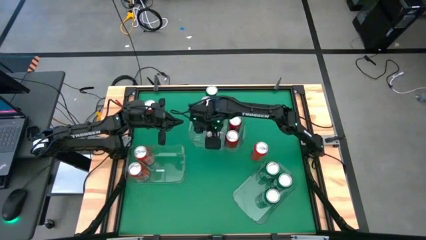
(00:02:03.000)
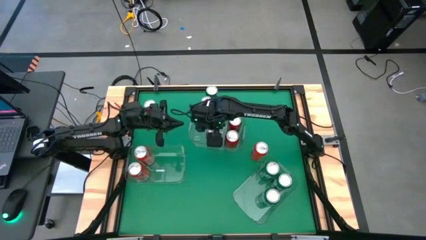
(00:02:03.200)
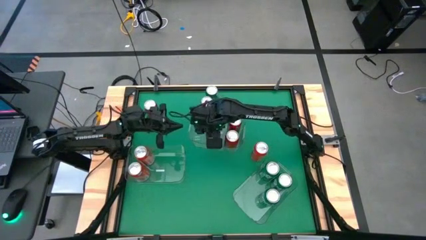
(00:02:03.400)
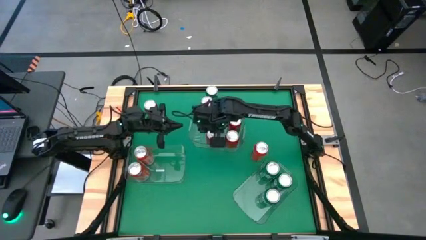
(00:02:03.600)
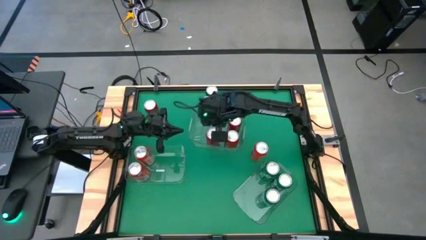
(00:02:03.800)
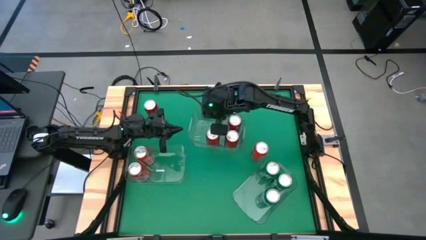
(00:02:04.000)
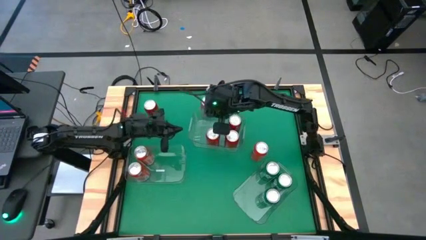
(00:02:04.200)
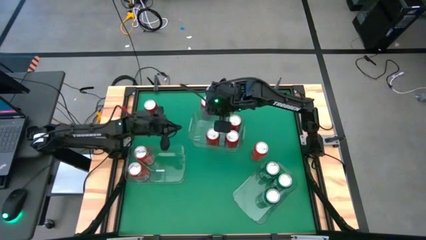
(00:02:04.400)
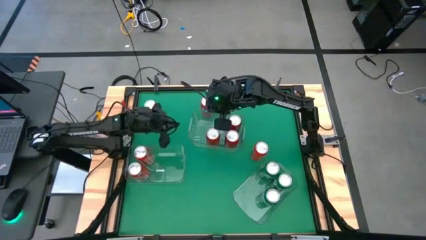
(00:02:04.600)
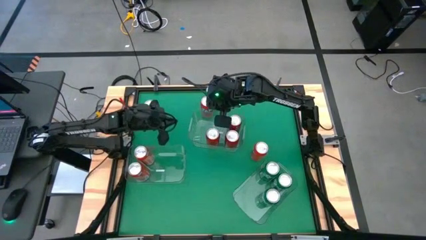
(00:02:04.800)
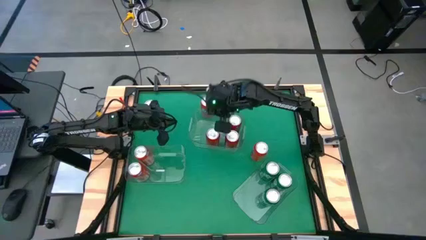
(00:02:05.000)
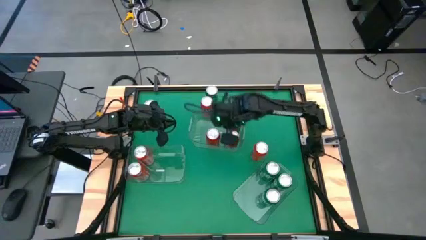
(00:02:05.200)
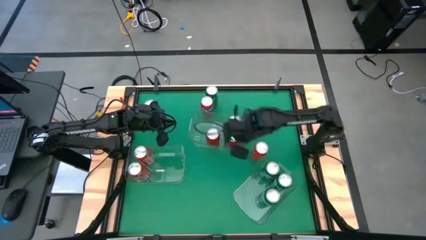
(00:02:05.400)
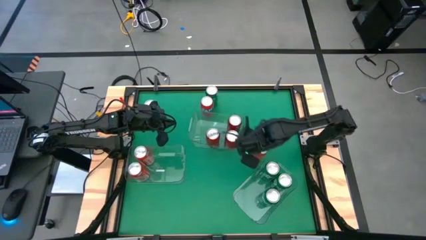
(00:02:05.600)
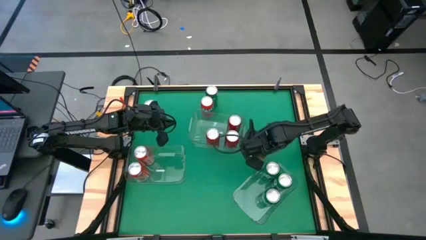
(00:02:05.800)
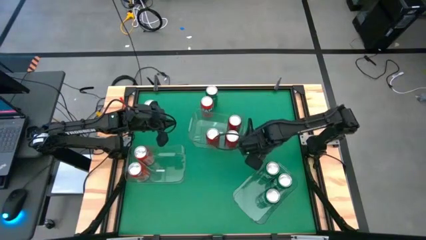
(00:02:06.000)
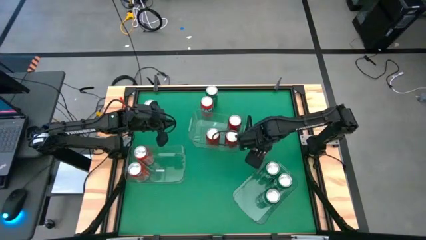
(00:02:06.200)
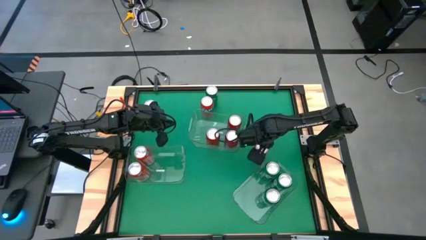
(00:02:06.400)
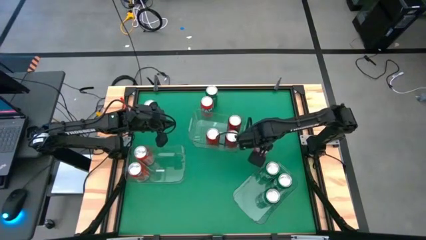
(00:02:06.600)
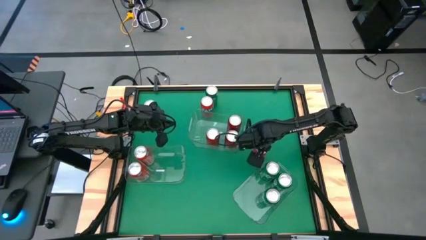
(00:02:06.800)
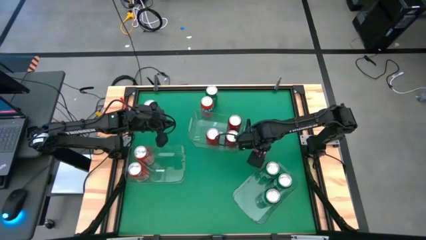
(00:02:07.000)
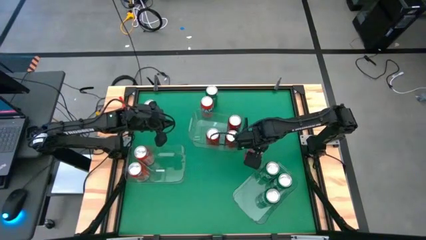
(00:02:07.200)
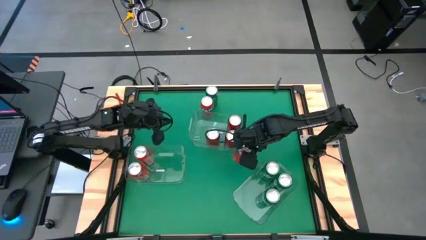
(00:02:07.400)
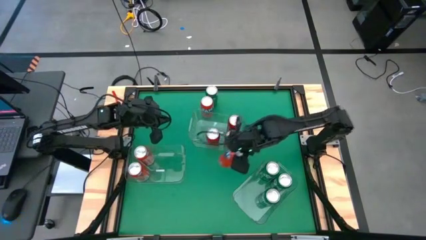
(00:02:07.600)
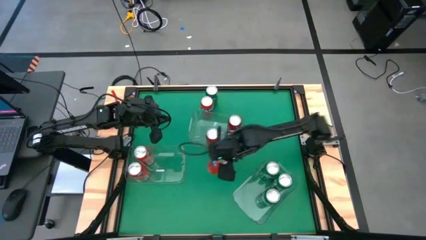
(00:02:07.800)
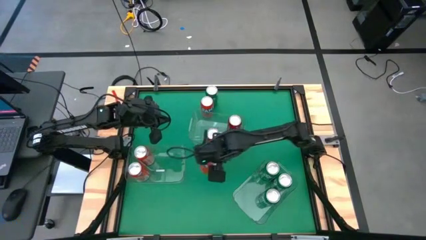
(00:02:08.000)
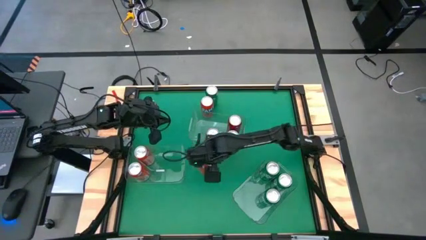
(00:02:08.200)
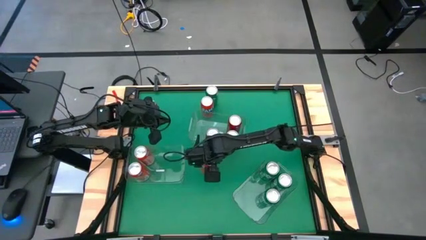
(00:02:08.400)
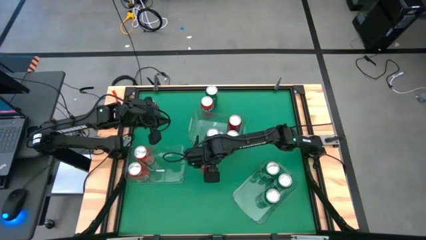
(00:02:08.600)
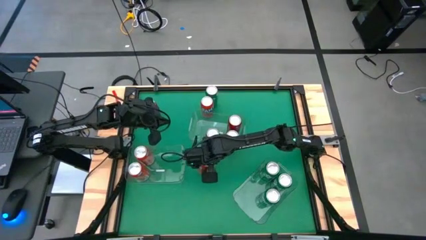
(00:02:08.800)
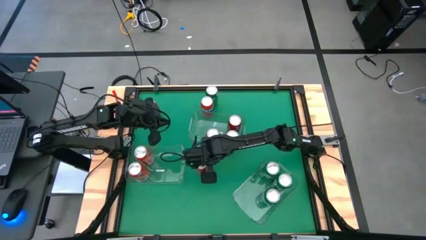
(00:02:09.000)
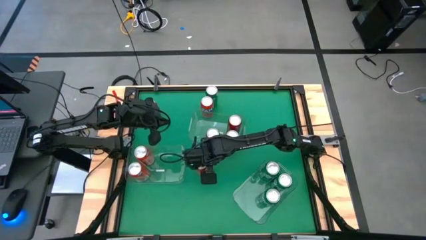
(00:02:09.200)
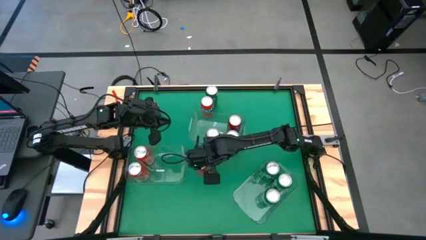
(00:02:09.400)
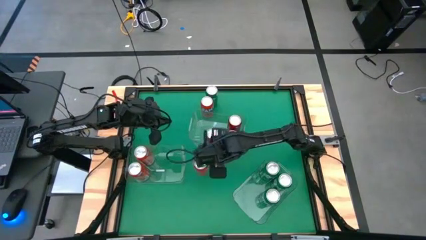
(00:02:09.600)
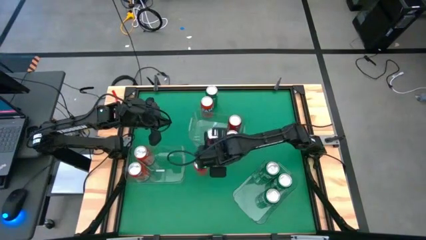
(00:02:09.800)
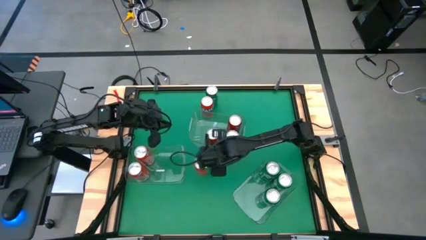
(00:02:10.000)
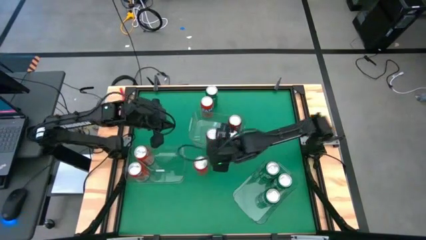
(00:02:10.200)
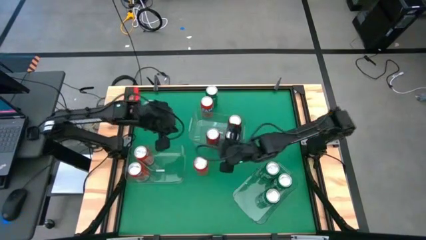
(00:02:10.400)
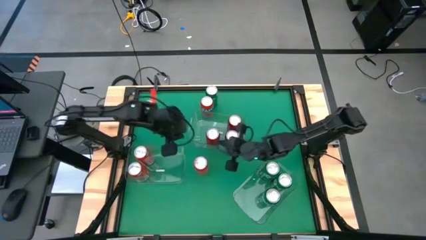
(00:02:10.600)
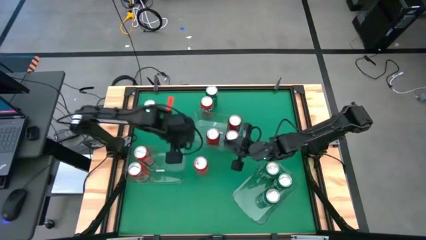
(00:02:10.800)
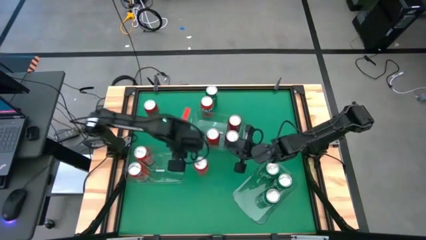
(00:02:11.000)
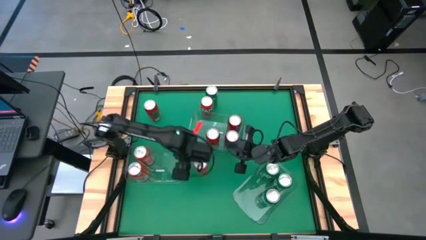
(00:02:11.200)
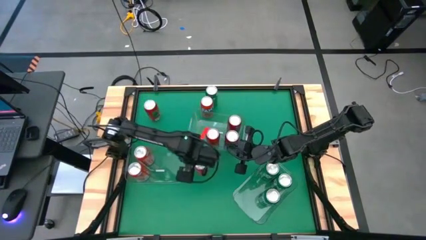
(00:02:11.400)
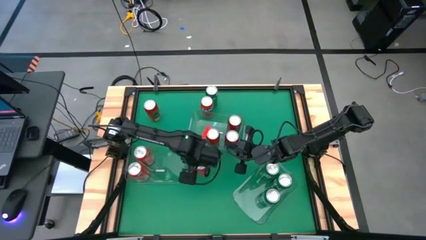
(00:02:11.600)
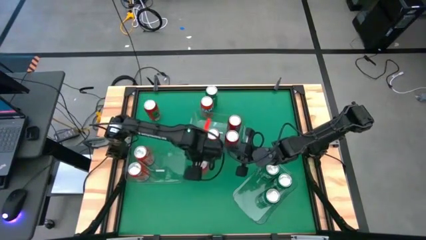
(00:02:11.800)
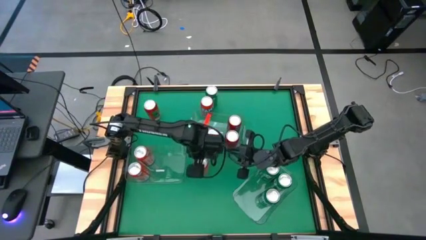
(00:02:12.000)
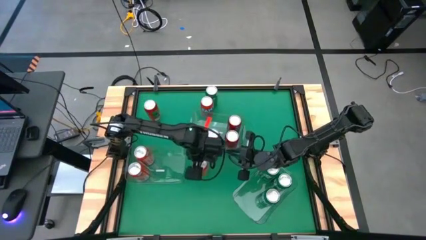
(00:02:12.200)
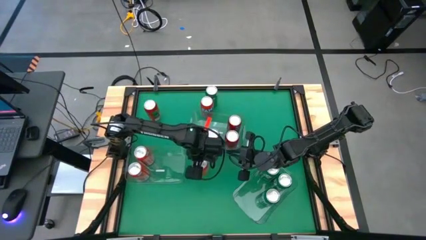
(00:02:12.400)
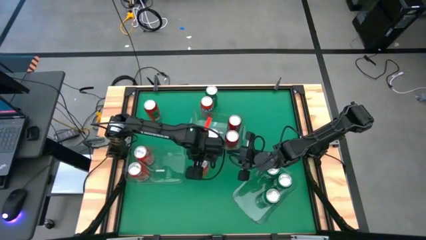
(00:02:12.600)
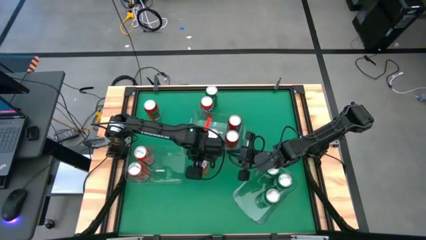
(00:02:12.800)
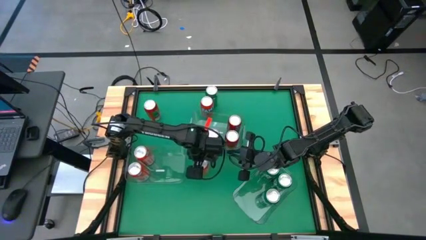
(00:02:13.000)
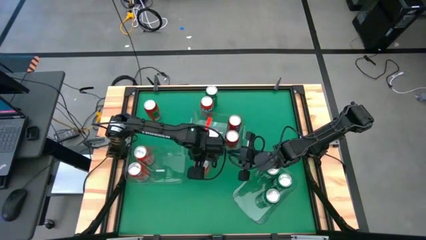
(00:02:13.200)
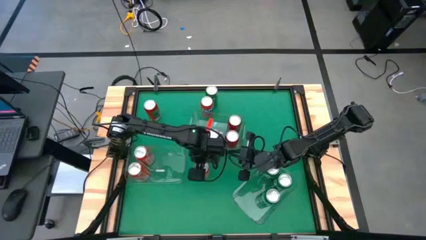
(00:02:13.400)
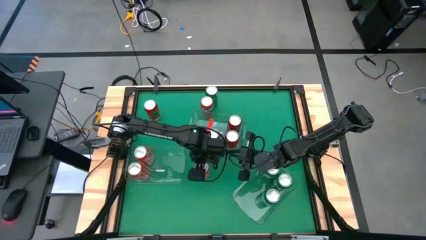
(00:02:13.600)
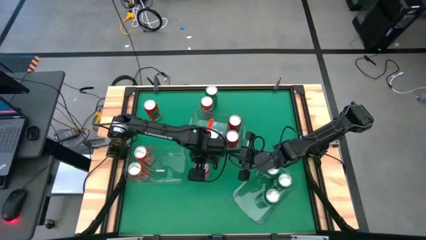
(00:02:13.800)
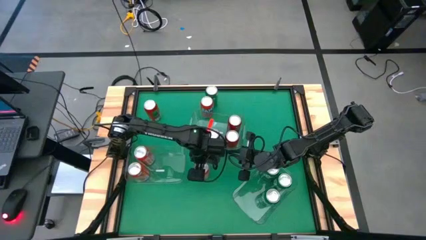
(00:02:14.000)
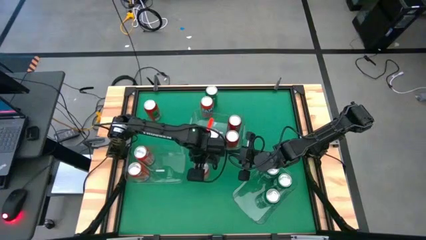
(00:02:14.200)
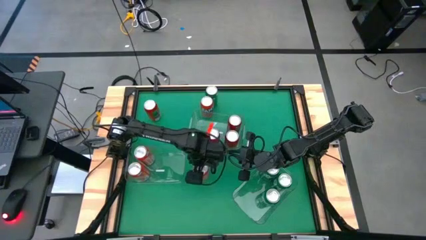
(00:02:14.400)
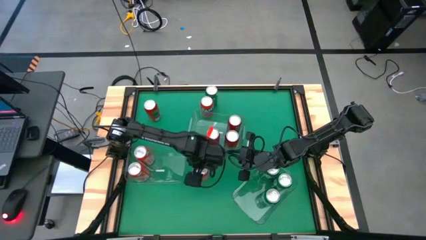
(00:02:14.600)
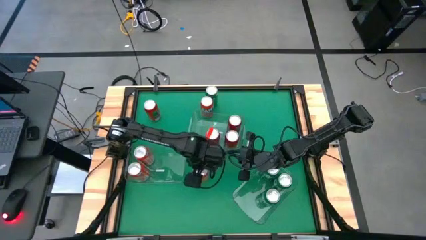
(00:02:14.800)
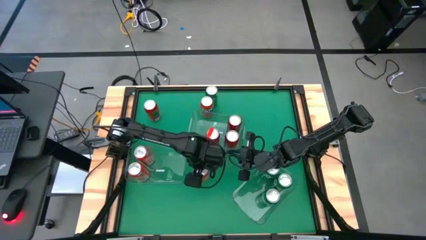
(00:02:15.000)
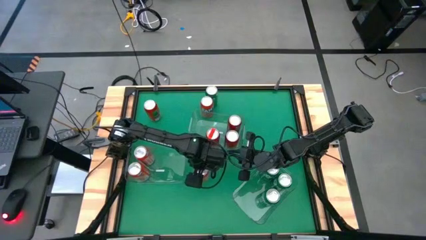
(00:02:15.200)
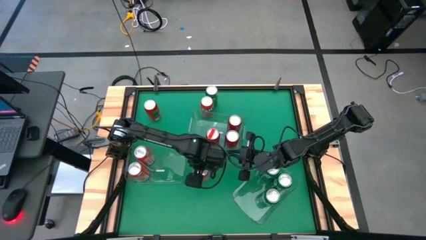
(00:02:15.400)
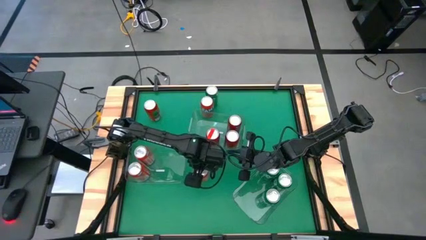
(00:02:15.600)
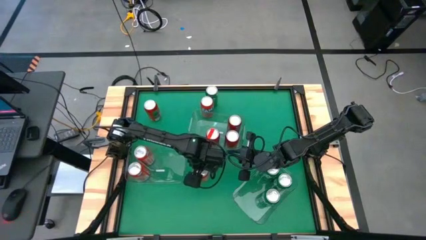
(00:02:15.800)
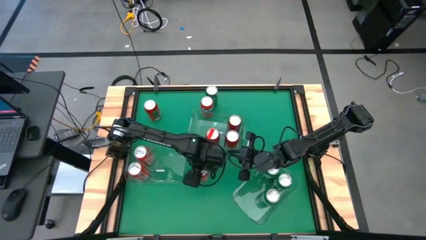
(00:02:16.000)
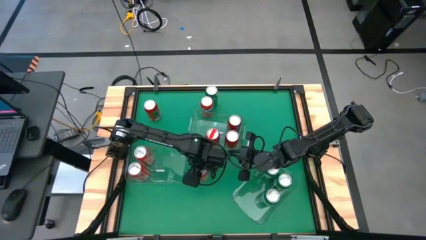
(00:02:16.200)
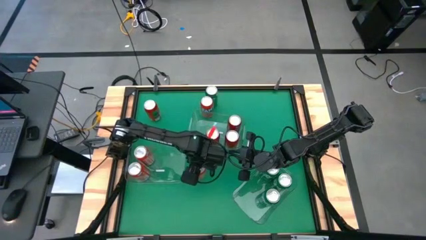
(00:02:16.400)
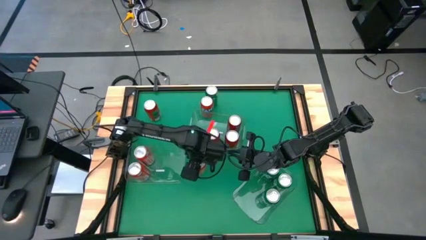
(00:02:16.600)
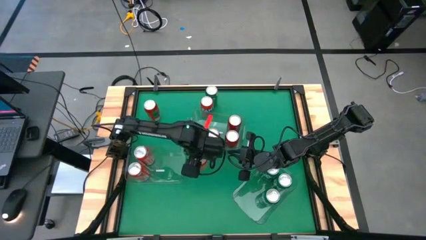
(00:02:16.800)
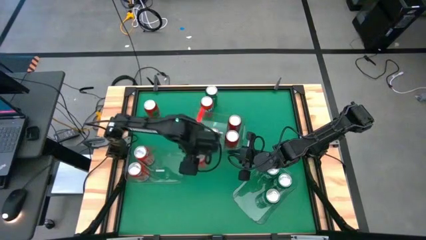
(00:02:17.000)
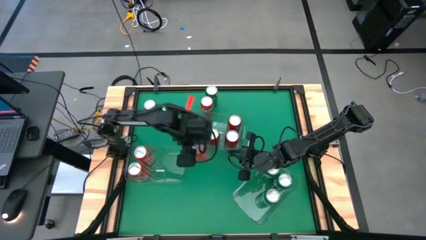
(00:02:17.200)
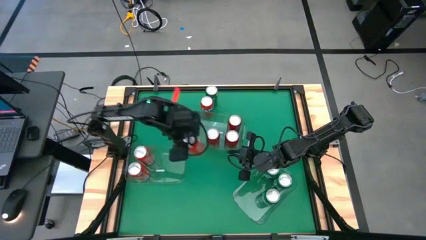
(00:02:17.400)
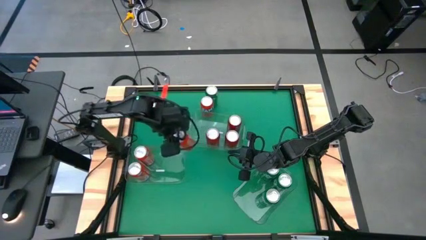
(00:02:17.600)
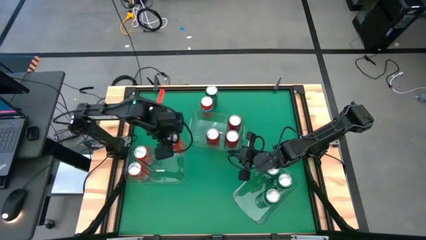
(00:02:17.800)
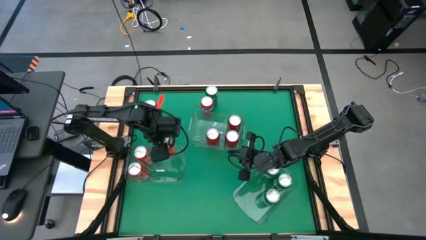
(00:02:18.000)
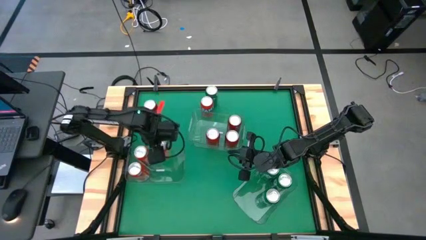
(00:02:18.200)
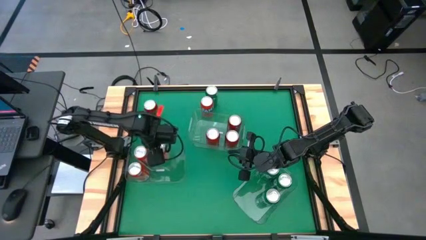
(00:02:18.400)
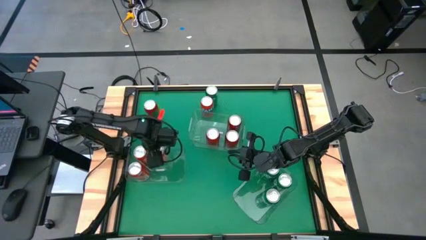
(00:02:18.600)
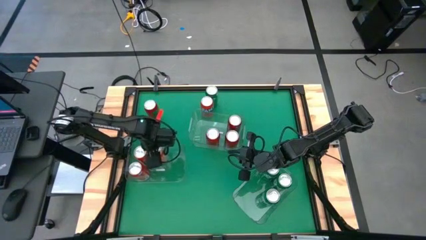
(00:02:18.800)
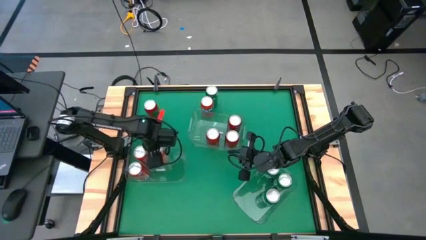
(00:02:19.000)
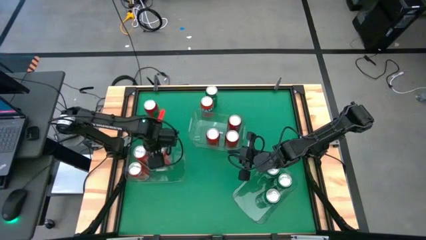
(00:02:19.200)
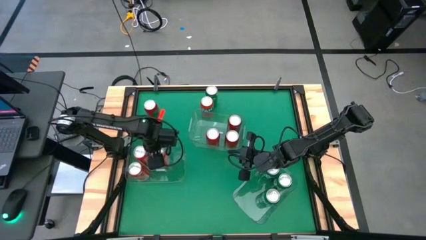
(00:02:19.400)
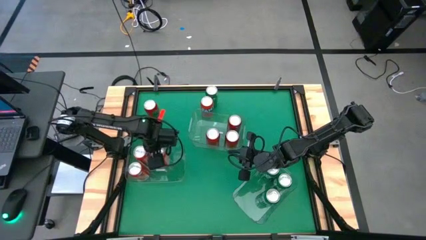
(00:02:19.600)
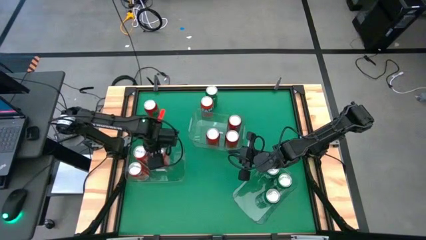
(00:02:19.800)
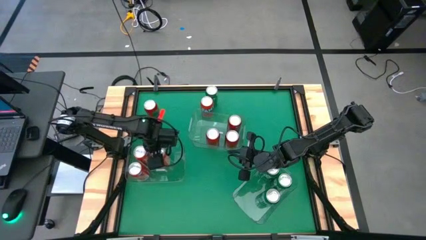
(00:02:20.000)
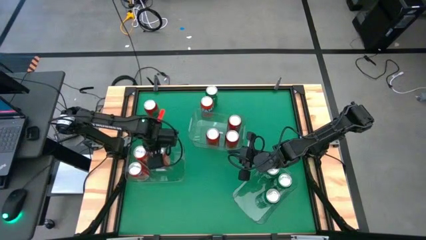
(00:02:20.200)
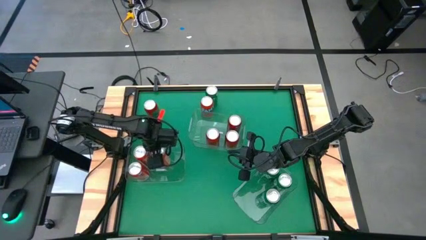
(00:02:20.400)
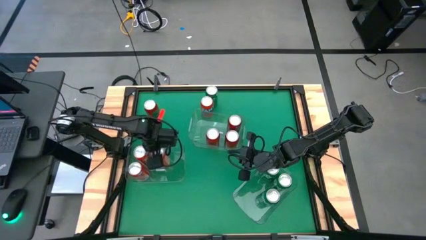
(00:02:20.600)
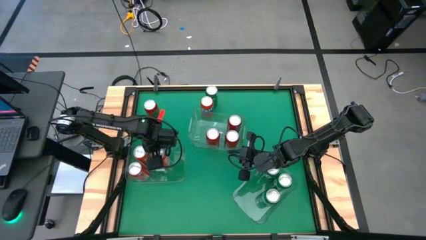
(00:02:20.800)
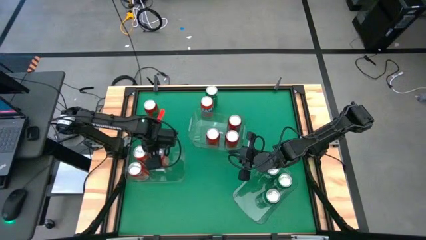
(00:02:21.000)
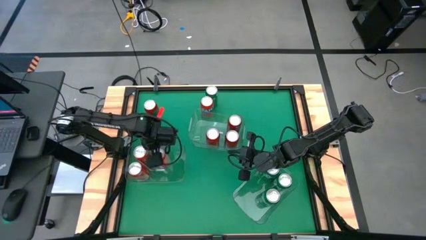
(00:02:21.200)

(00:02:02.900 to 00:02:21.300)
Task: Sort soda cans
Put the bottom red soda can into the bottom left transparent bin
